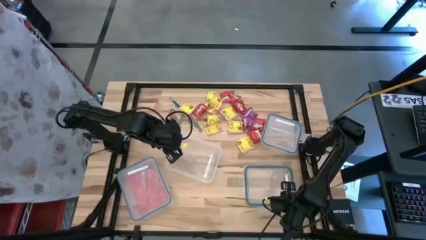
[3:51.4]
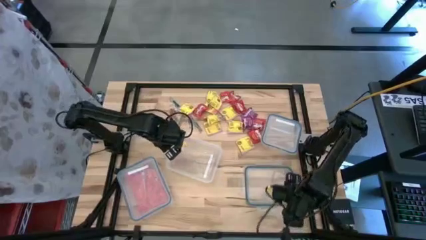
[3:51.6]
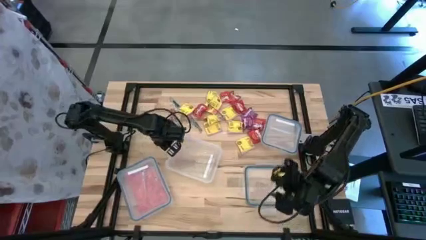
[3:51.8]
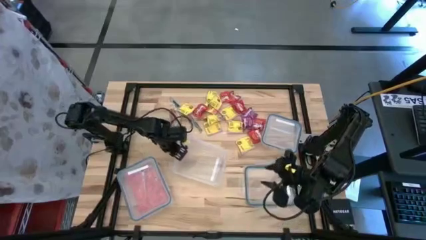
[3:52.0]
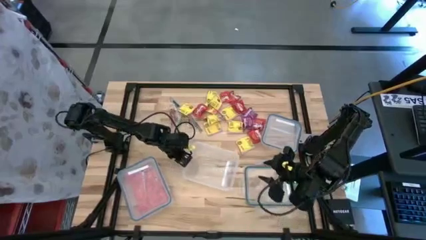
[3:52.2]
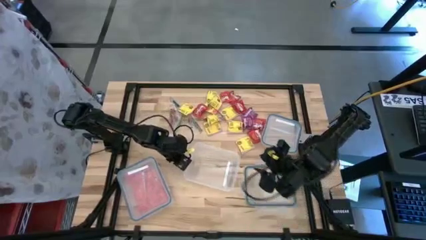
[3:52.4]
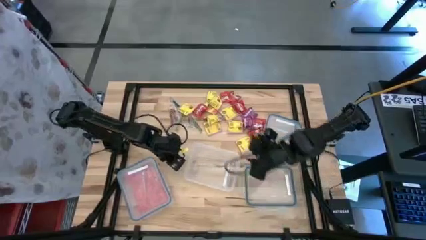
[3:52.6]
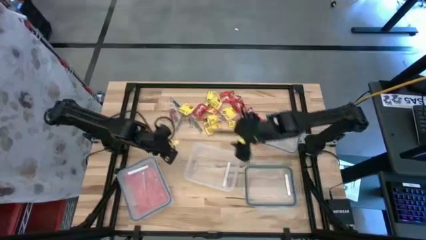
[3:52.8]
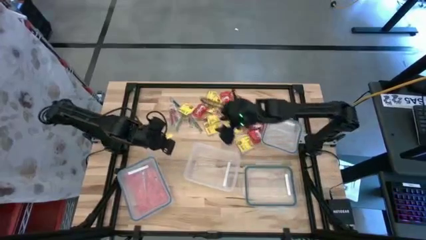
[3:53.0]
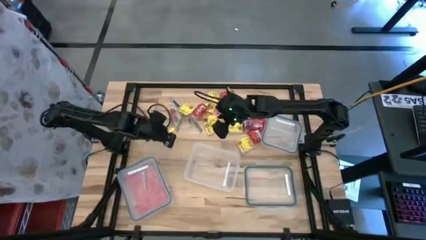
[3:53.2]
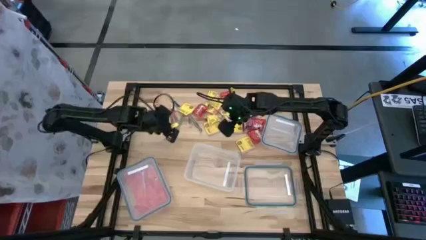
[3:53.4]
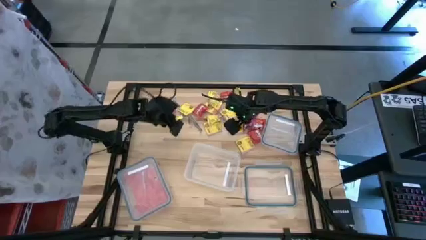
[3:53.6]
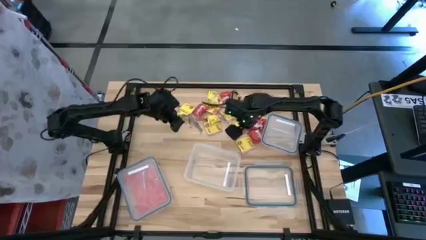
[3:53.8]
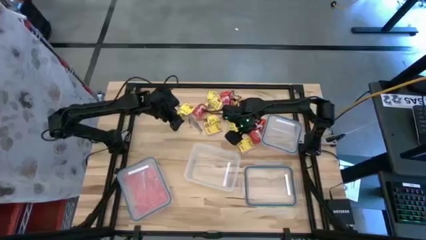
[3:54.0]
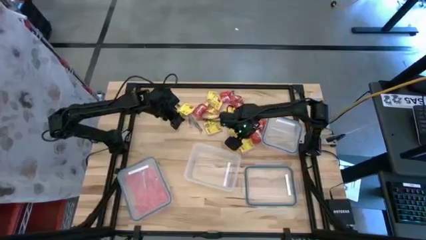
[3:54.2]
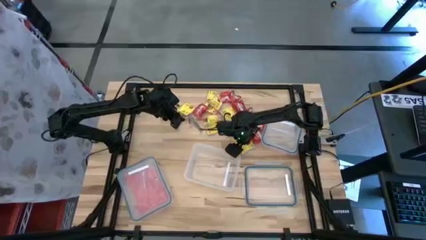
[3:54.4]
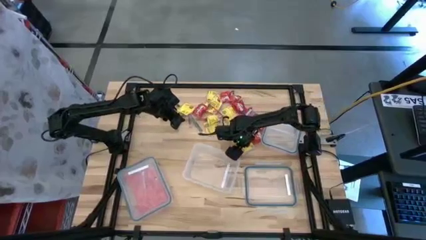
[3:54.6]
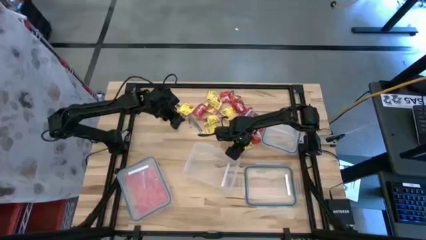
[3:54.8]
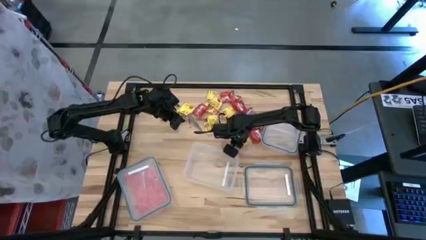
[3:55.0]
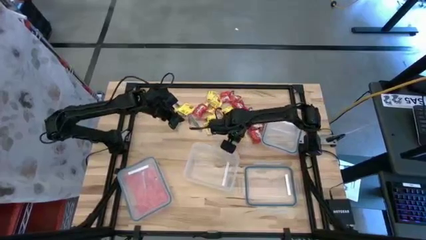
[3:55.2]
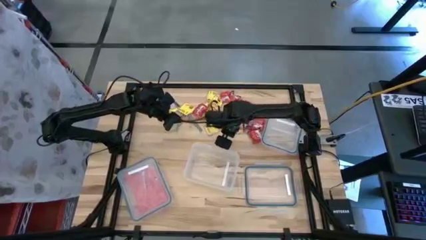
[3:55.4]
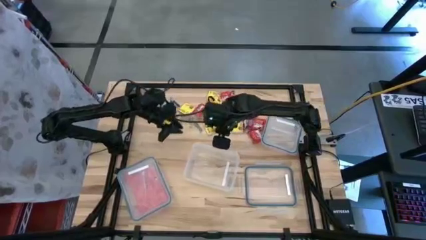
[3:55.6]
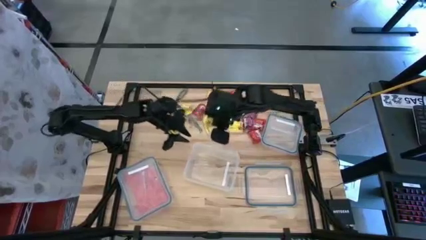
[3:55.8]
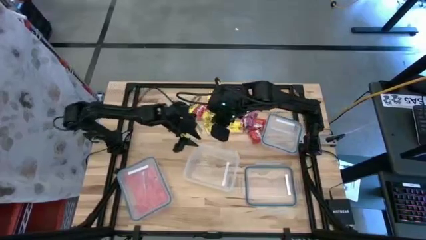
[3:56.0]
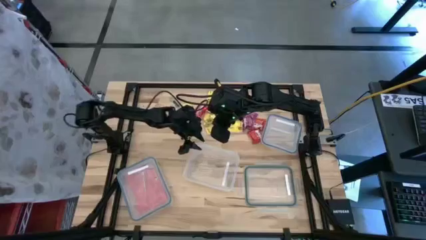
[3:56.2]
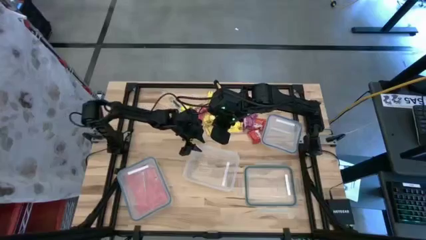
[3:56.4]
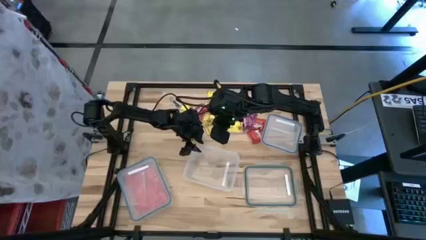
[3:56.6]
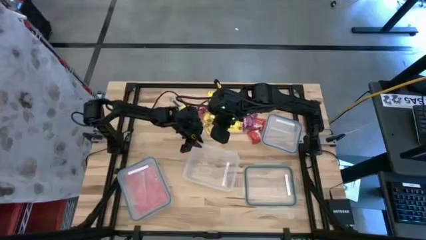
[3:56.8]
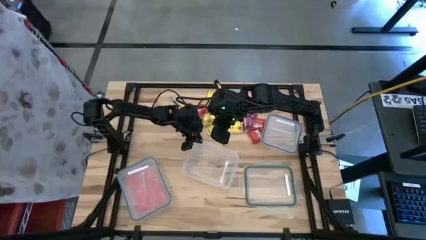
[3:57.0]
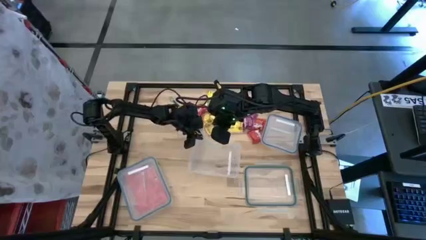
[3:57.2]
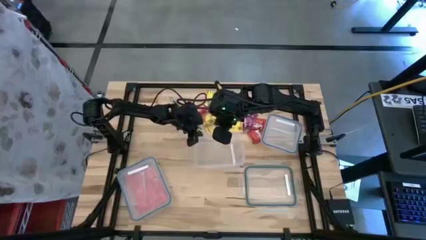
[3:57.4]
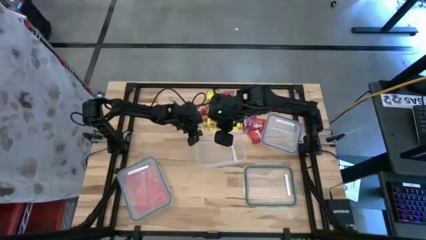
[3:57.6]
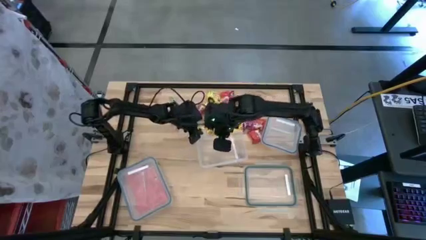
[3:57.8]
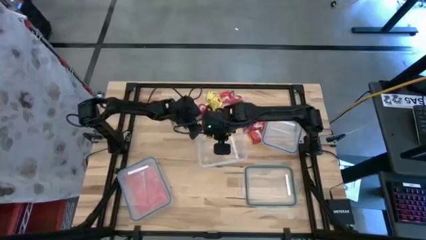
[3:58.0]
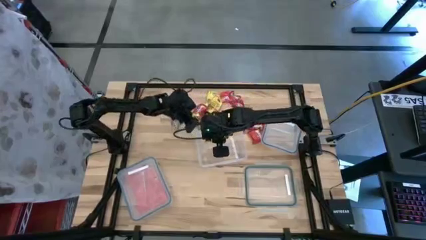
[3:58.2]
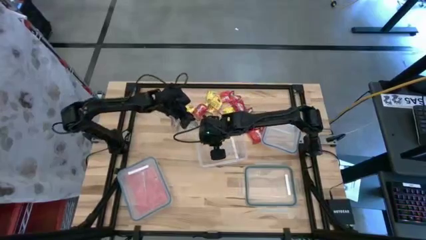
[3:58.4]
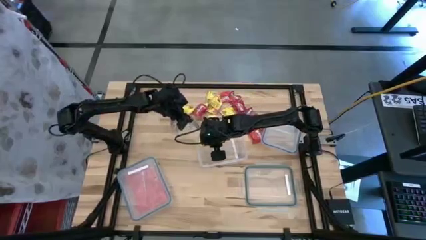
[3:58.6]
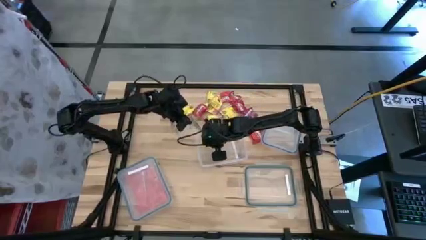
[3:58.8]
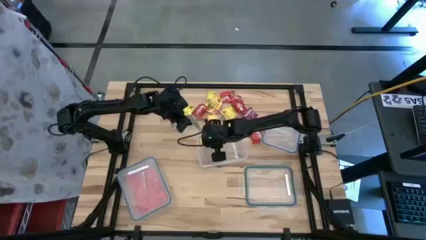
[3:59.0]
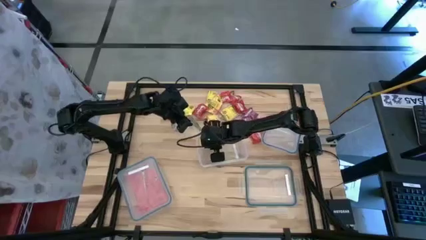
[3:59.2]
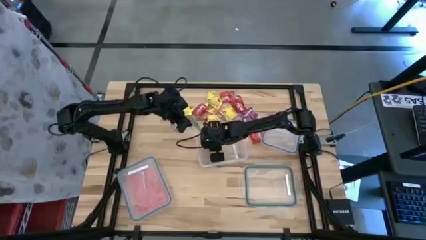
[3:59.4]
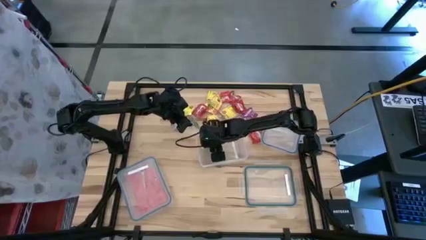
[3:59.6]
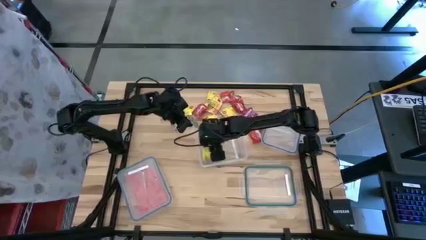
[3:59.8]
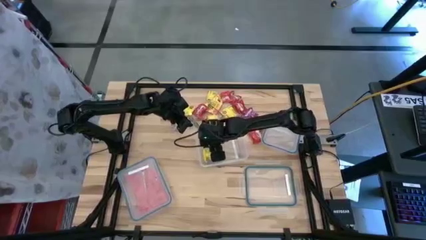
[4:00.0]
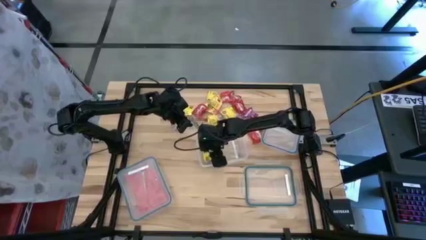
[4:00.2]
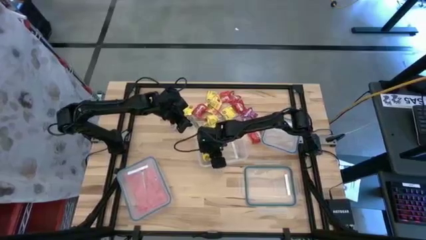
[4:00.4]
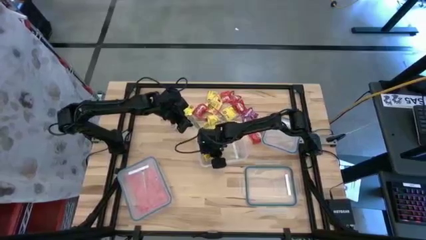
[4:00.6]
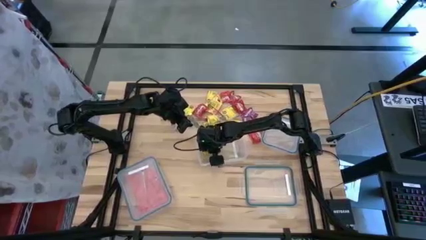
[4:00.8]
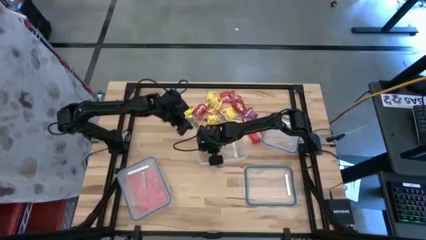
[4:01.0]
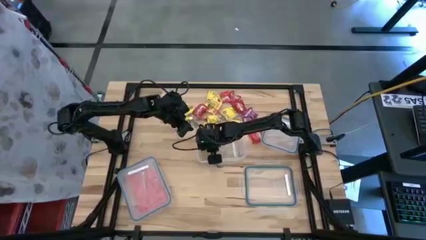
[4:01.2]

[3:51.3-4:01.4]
Task: Sort candy
Put the yellow candy into the rectangular transparent bin

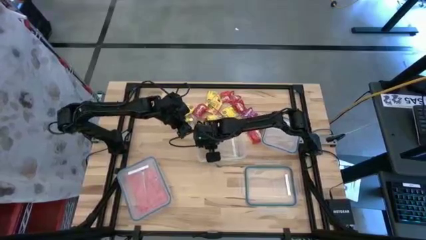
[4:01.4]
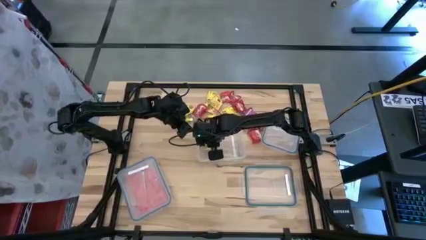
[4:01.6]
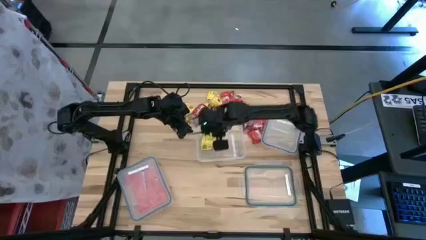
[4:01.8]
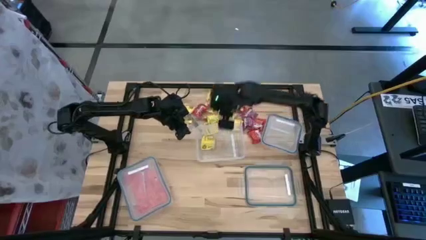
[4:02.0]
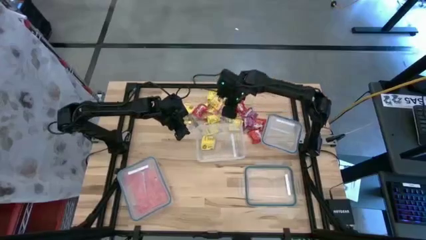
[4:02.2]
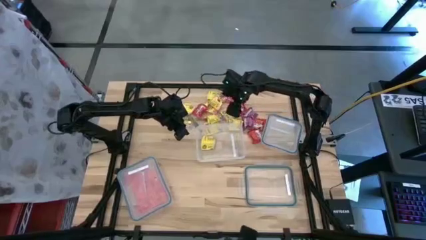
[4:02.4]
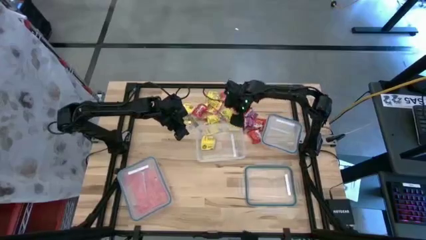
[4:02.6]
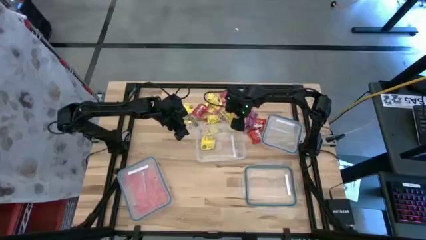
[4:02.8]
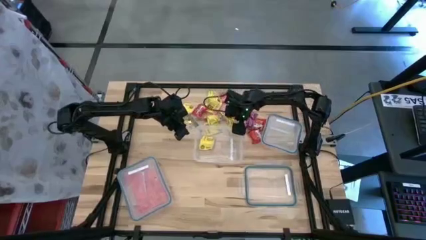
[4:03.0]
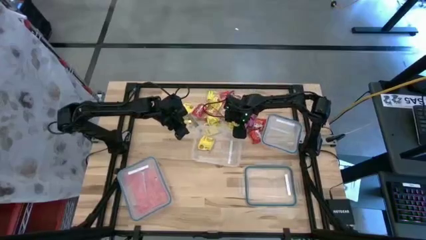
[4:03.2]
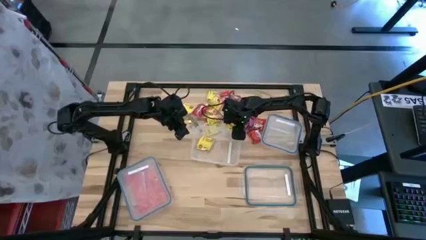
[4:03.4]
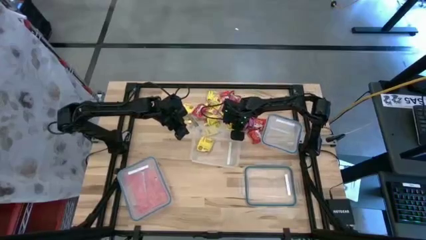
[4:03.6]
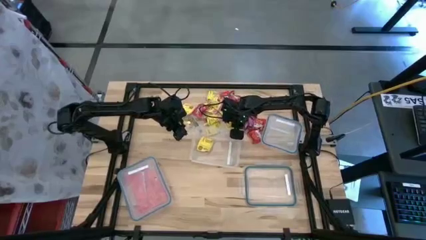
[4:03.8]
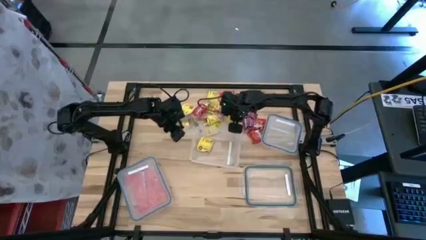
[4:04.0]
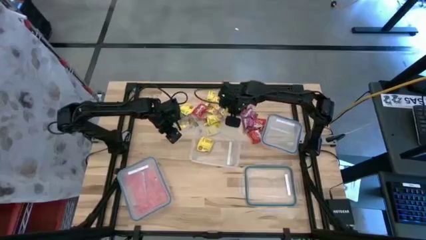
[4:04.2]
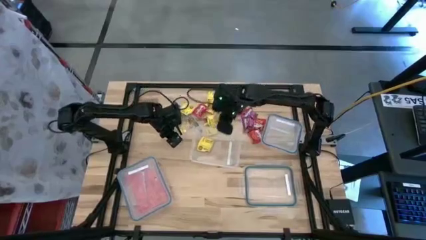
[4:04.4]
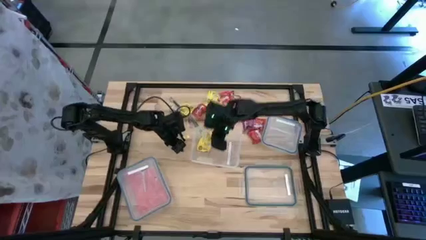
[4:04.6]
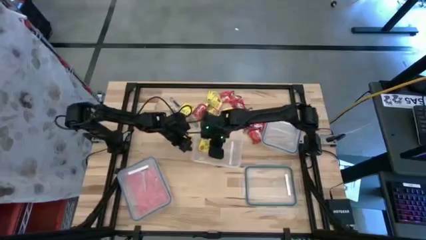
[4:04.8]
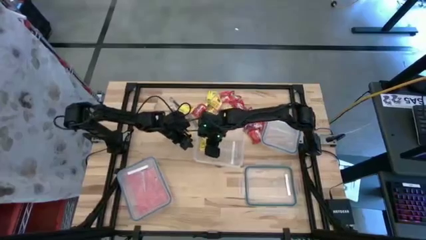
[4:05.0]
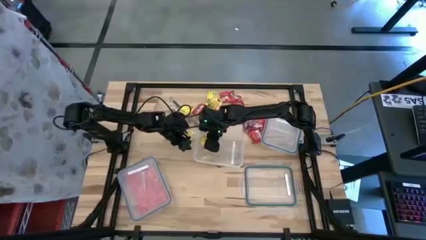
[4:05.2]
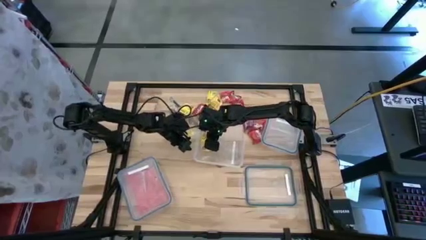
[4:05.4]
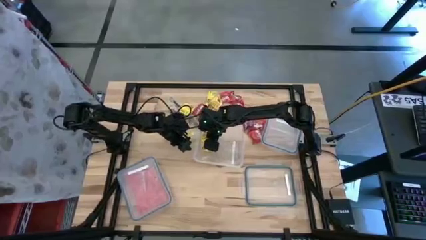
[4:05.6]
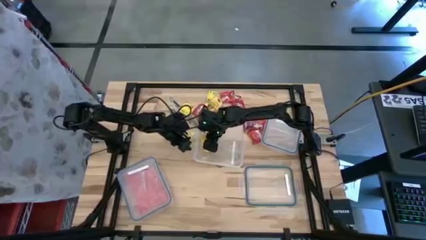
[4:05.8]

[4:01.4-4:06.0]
Put the yellow candy into the open transparent container

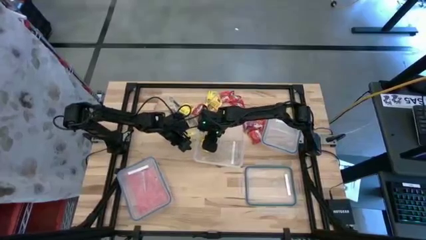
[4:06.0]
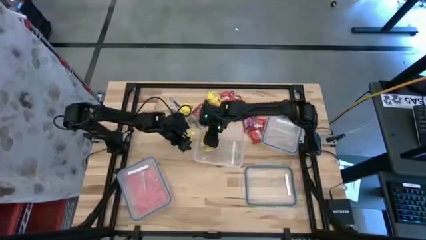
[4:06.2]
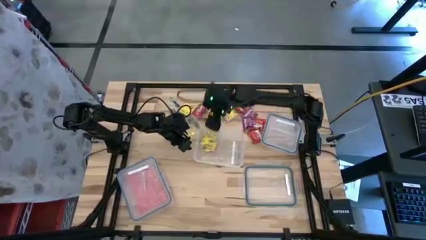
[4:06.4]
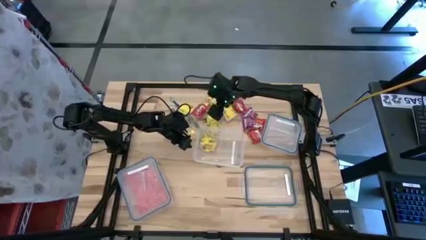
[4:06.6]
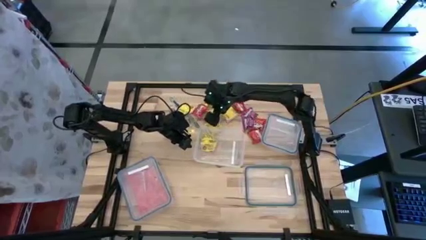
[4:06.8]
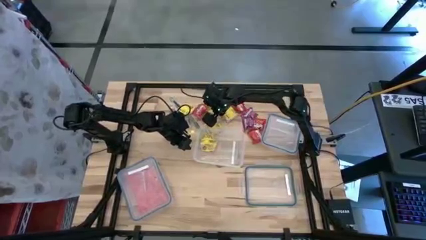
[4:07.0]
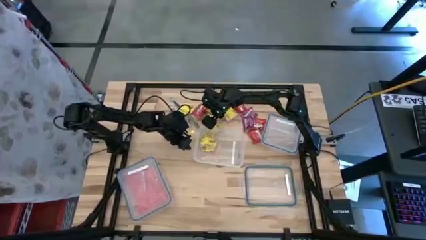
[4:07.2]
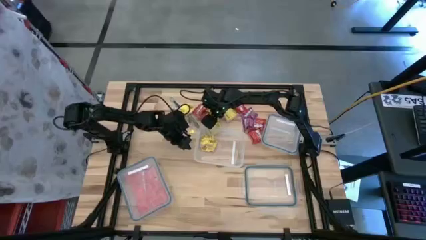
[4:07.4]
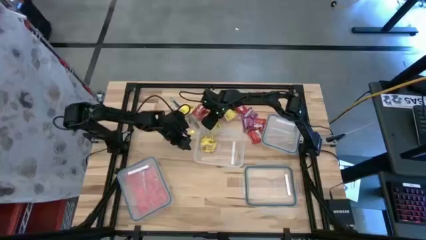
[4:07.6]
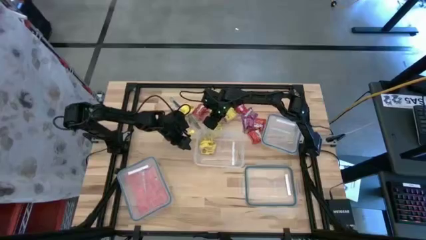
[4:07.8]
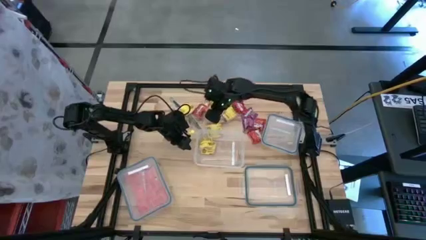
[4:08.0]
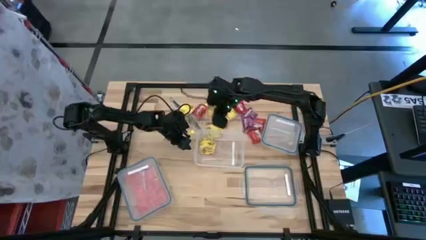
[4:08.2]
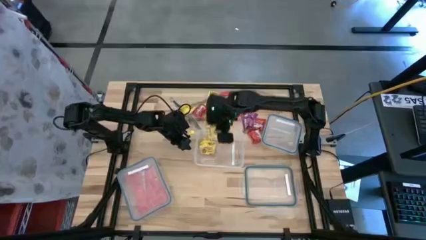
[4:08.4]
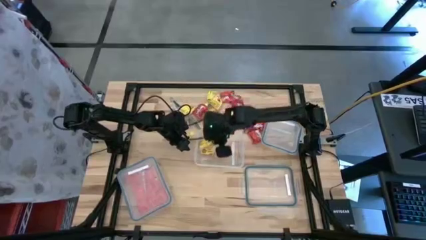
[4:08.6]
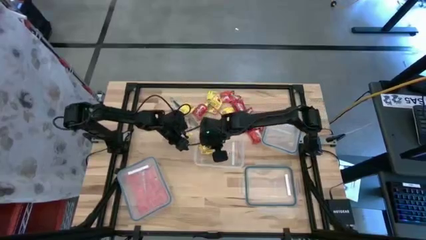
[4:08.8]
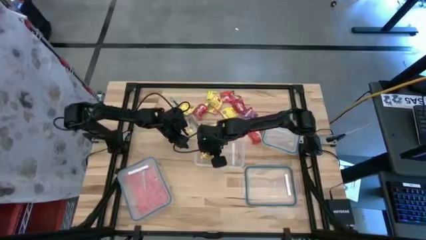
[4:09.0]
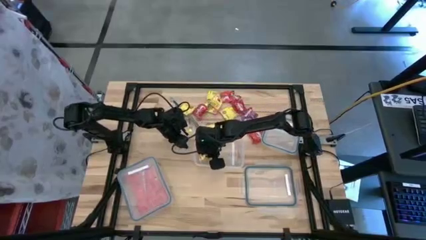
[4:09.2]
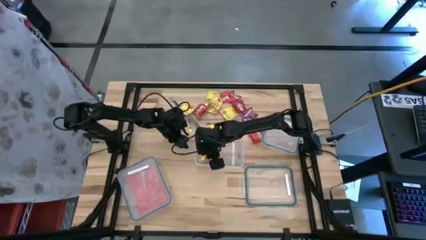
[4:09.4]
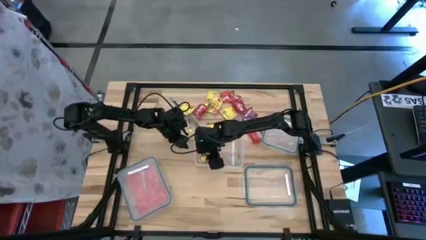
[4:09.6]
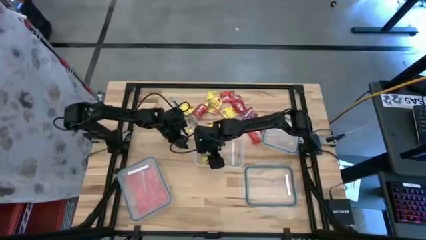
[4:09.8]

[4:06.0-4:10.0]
Put the yellow candy into the rectangular transparent bin
